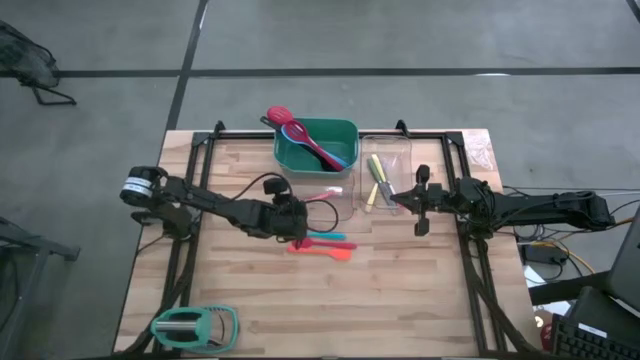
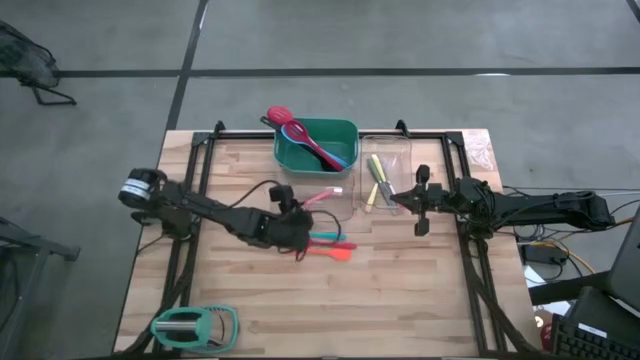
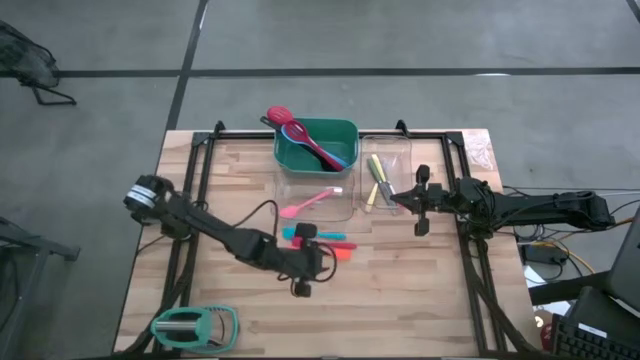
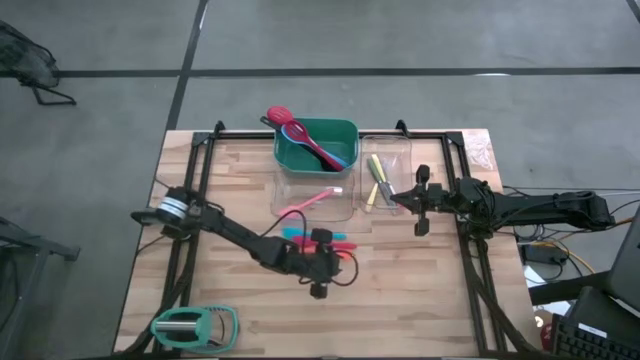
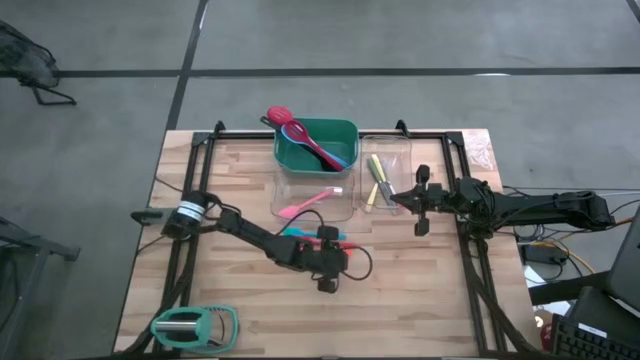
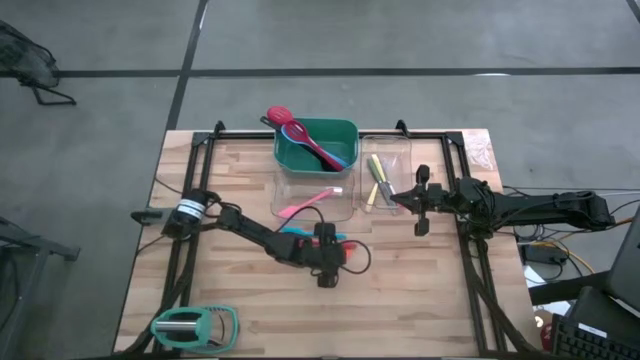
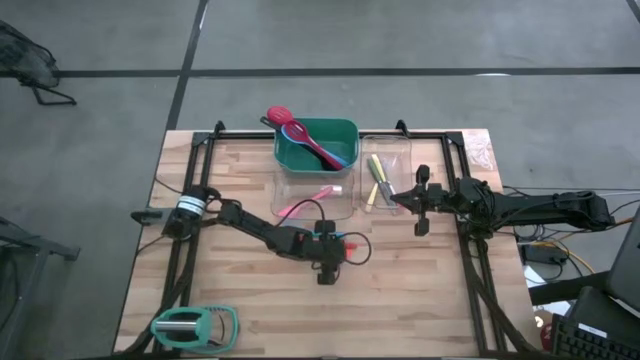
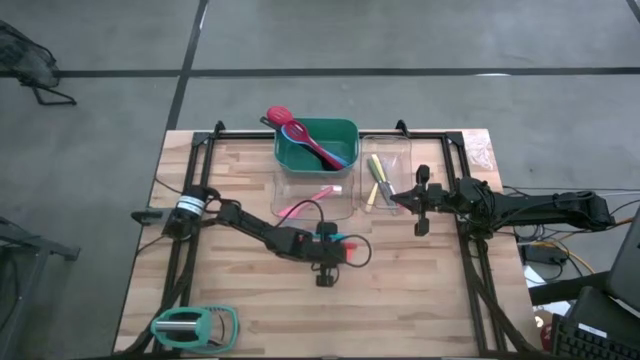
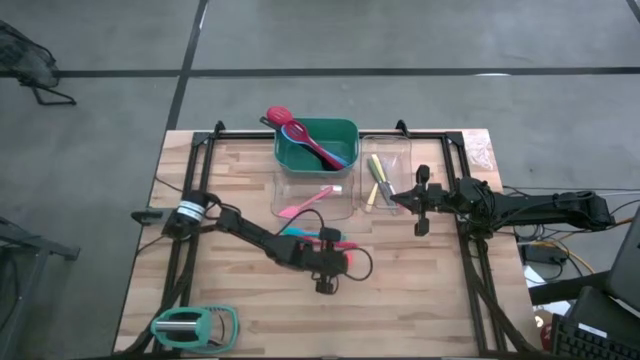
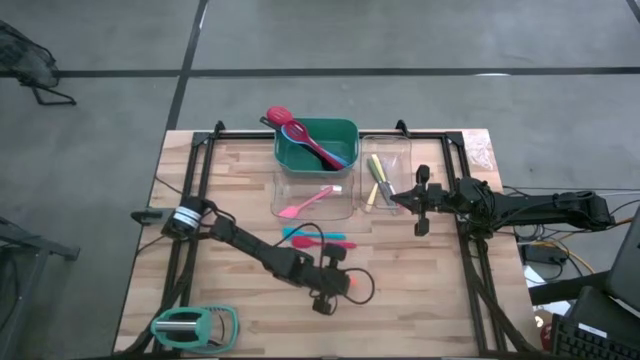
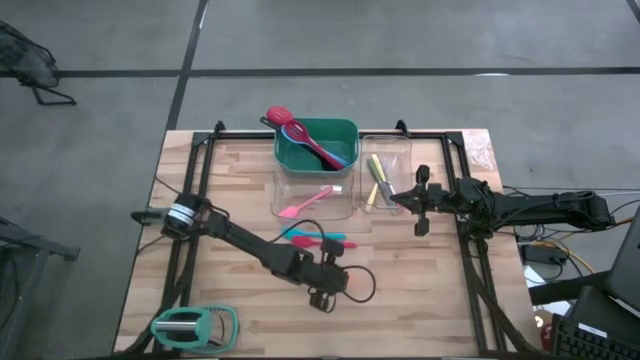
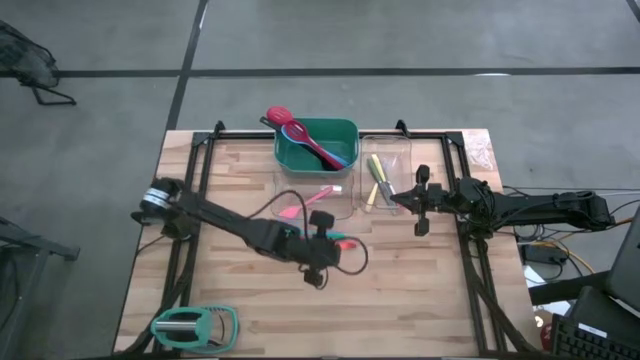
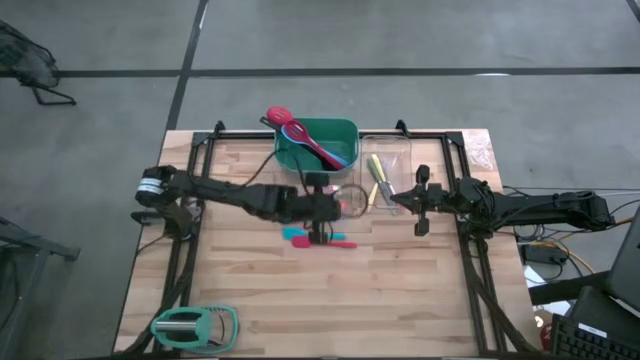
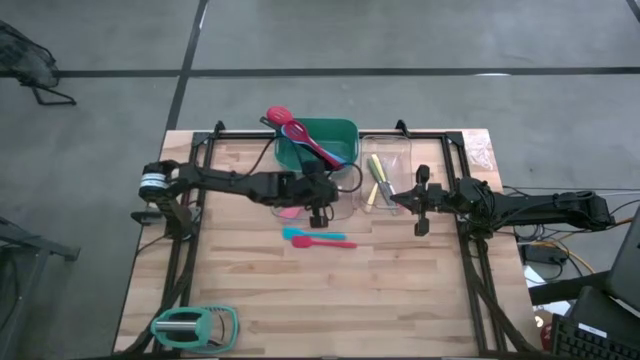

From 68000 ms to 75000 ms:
Task: Pick & Place Kitchen Items
Put the orange spatula into the left transparent bin

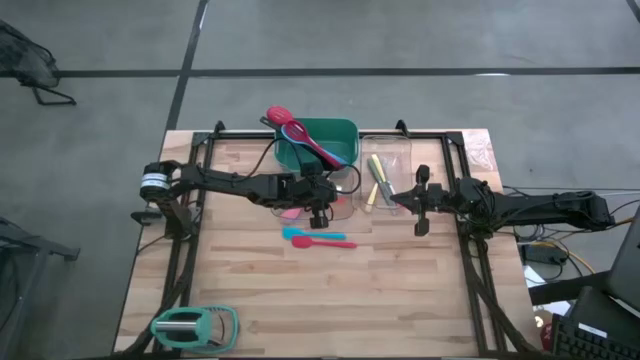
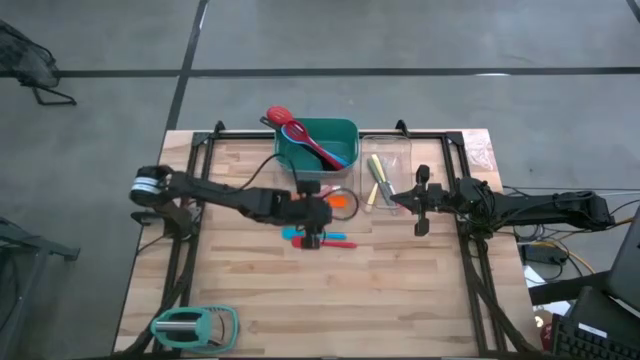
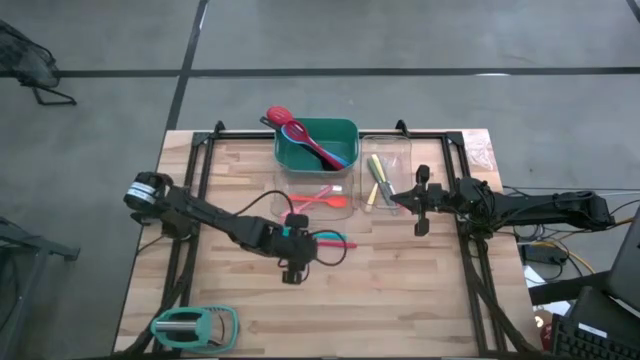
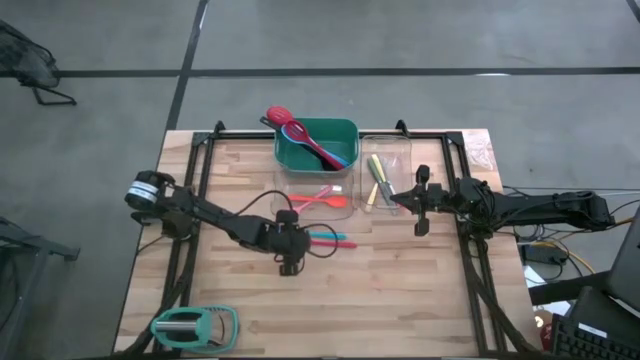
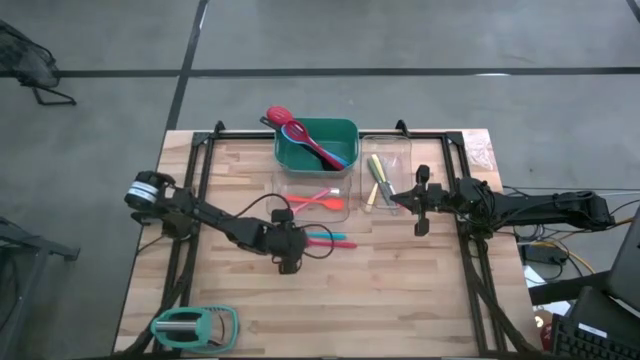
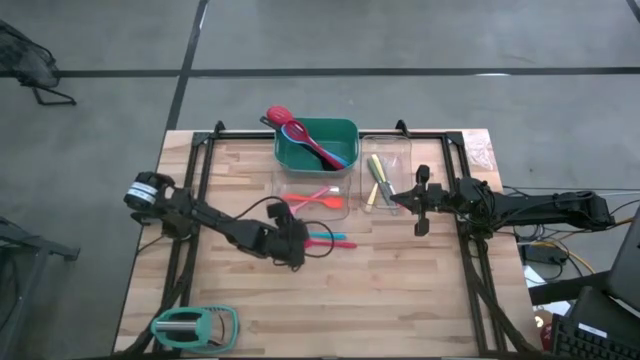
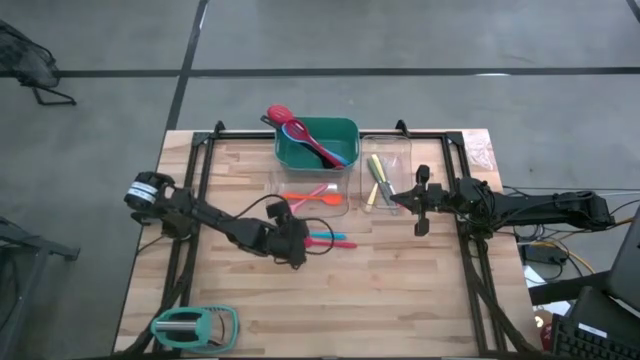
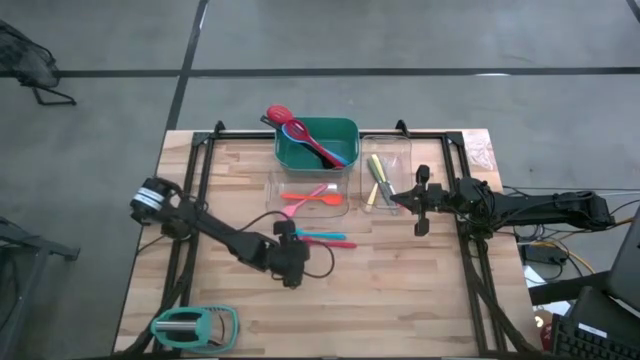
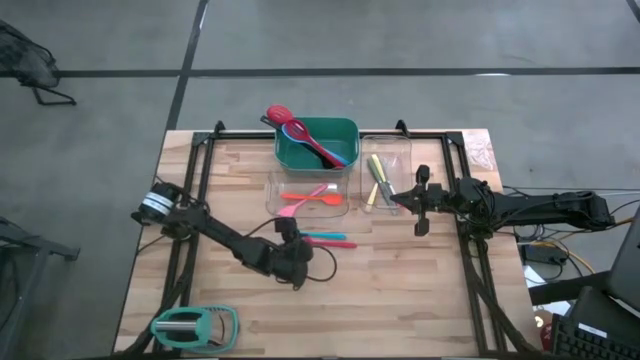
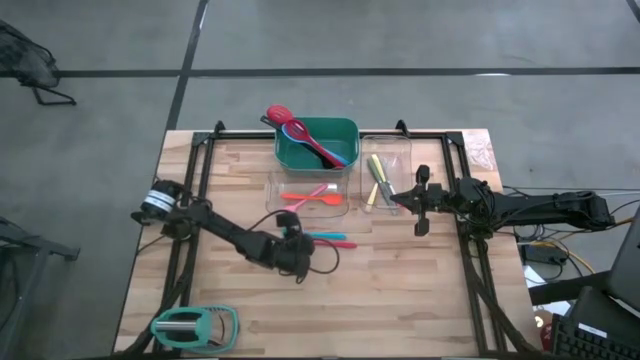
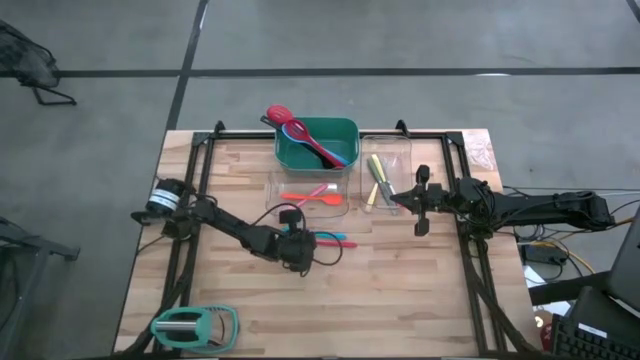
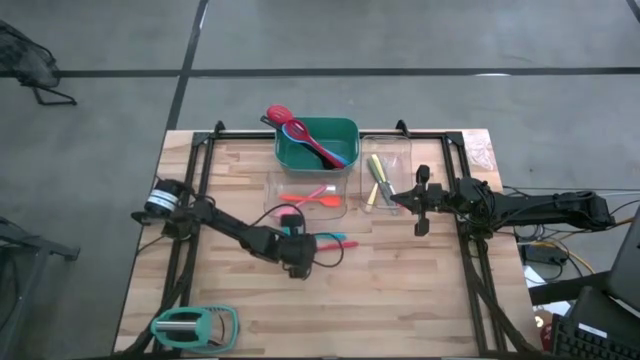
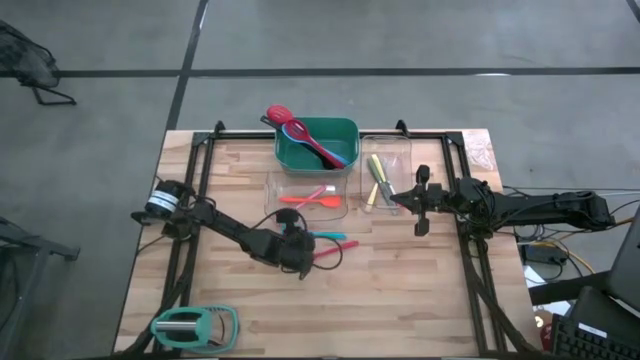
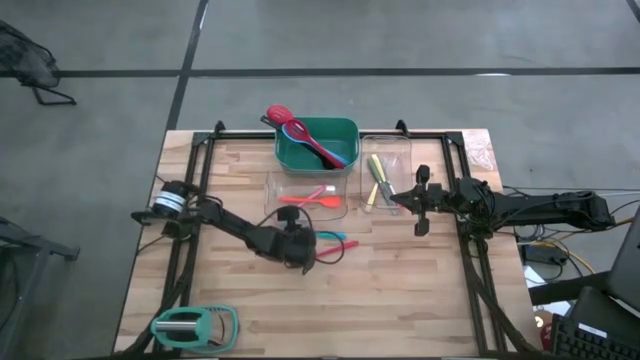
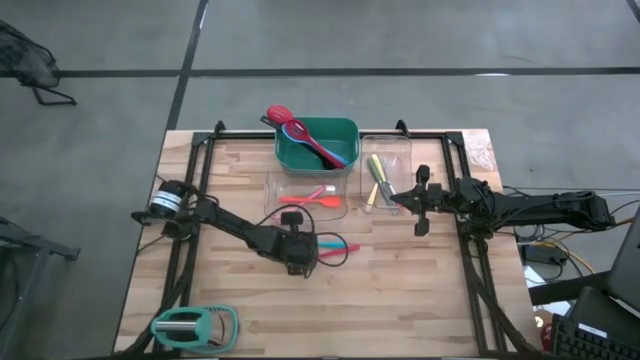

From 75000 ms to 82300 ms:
Adjust the colored spatulas

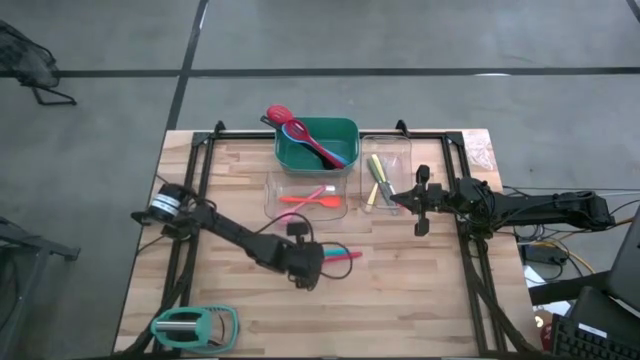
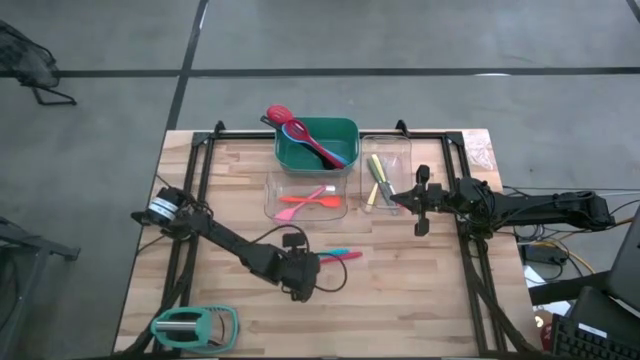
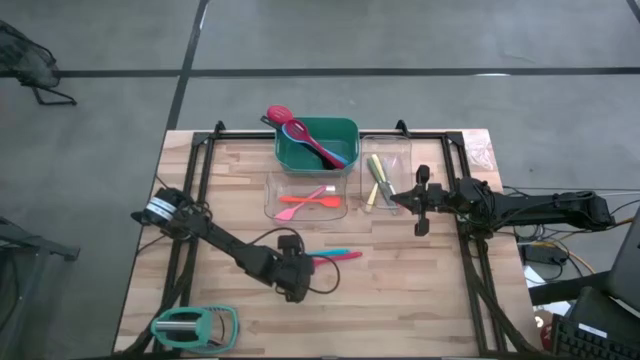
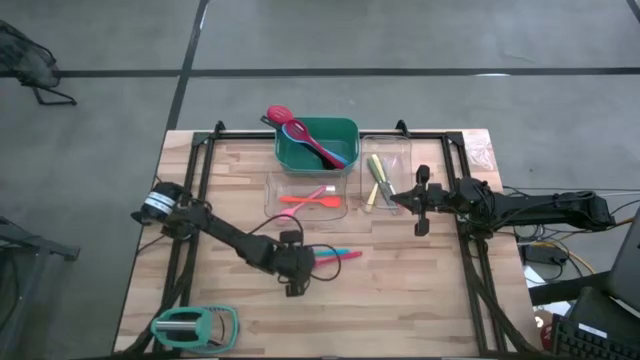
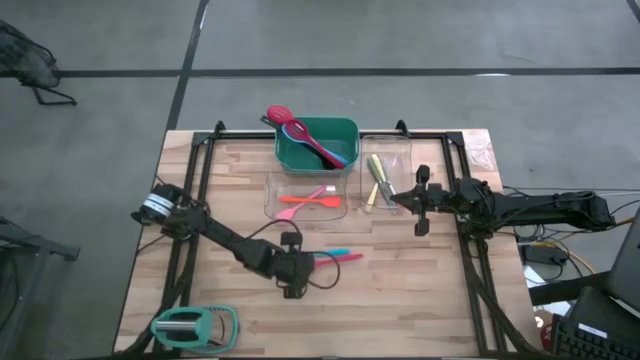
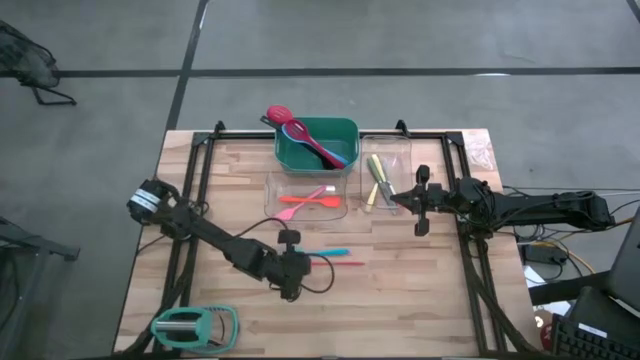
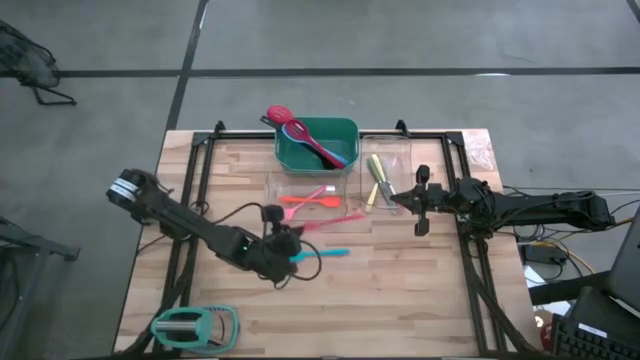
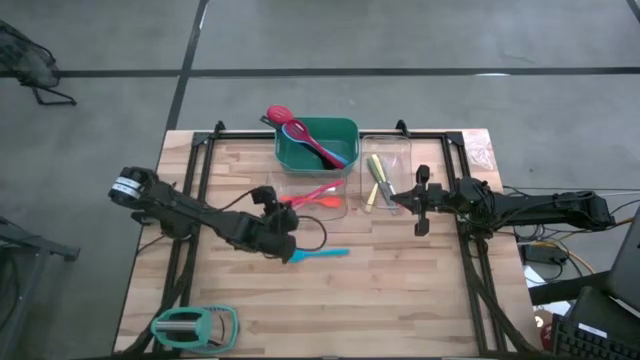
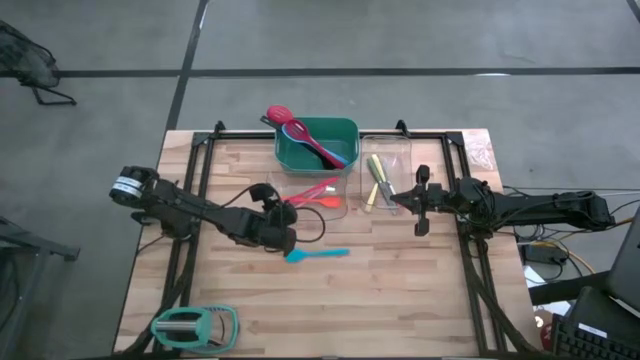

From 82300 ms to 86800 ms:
Put the red spatula into the left transparent bin

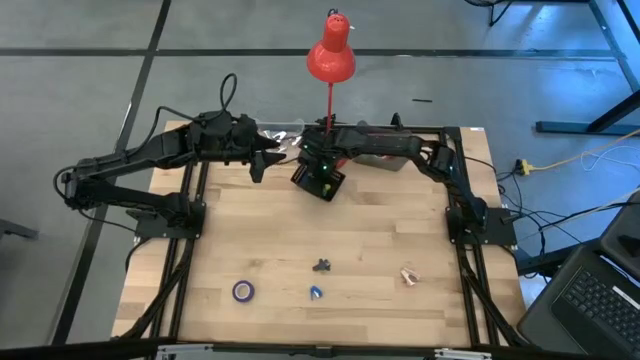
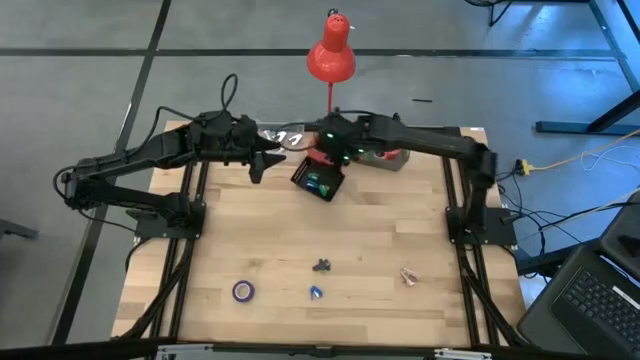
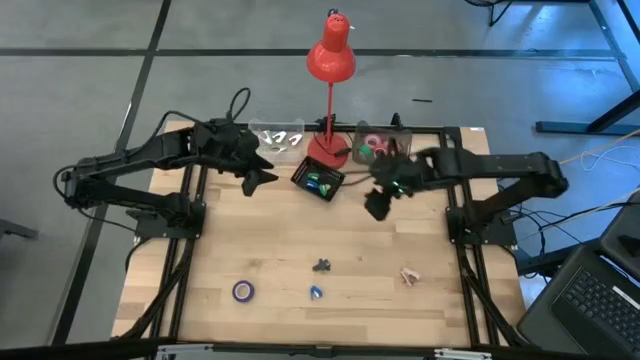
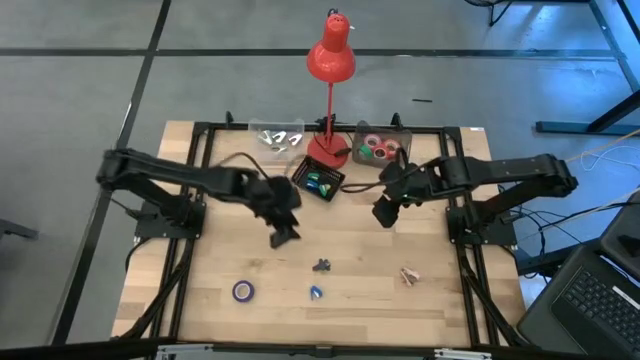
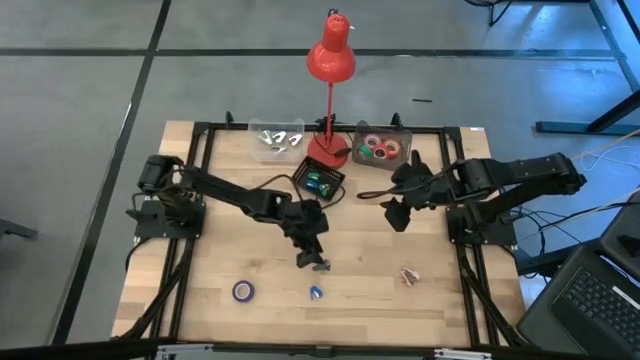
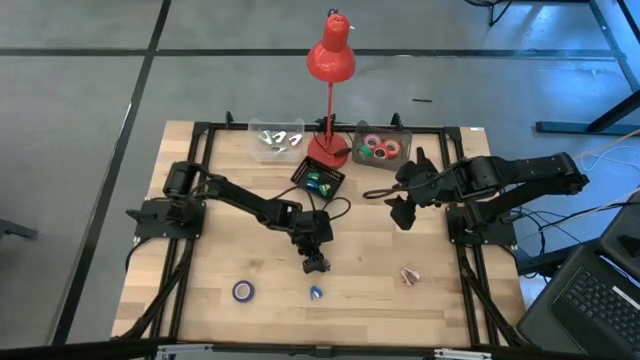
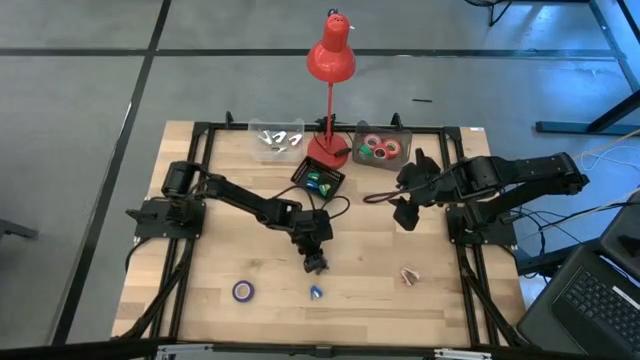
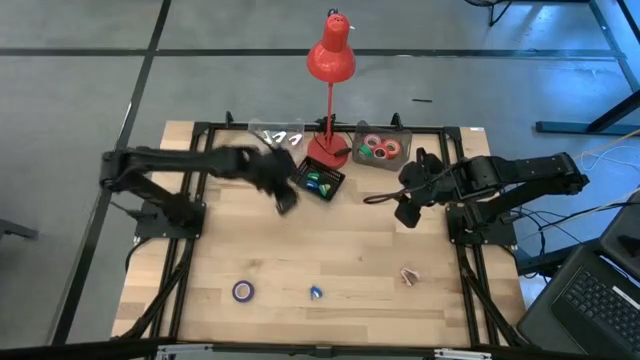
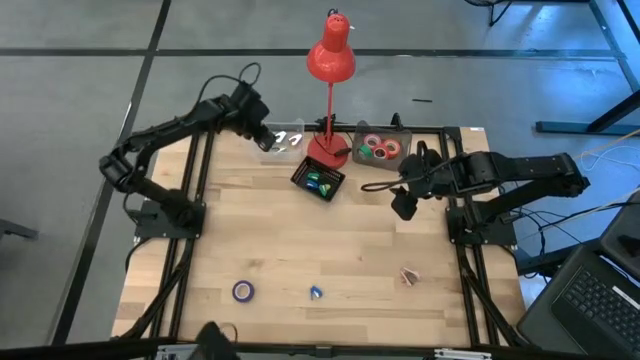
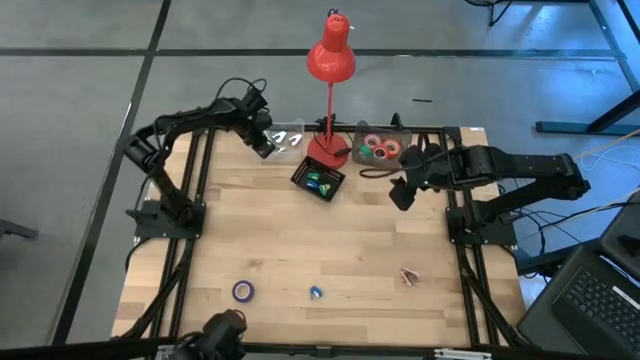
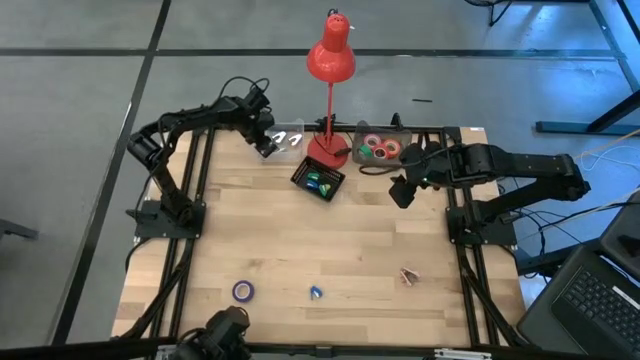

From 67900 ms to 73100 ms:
Task: Pick and place Stapler, Stapler remover, tape
Put the black staple remover into the transparent bin
